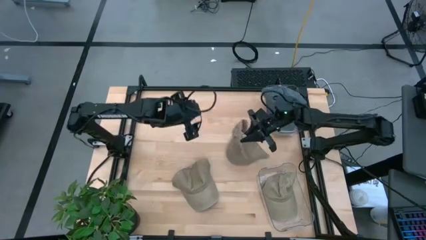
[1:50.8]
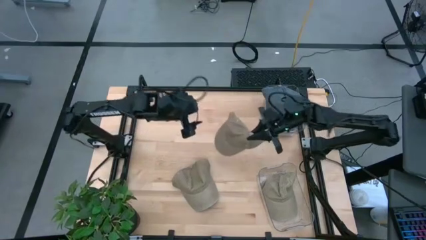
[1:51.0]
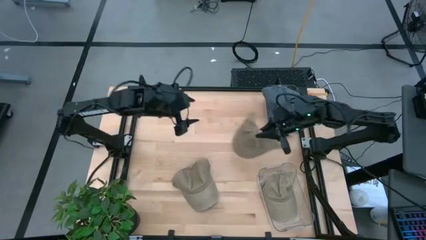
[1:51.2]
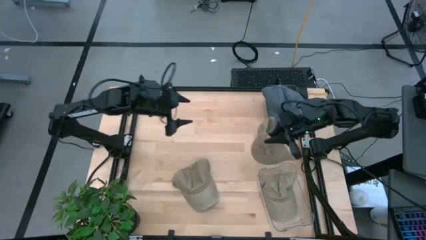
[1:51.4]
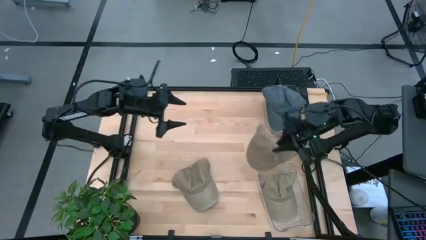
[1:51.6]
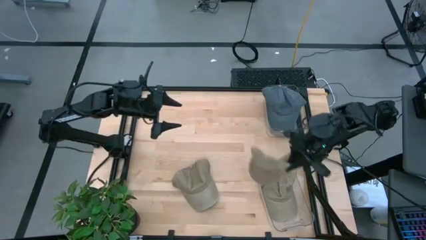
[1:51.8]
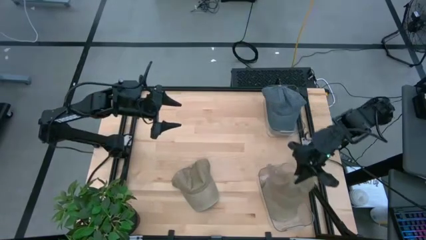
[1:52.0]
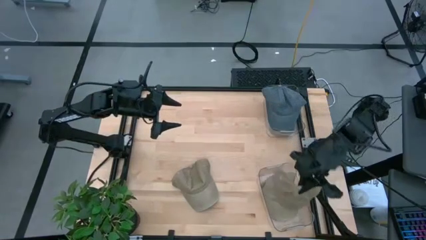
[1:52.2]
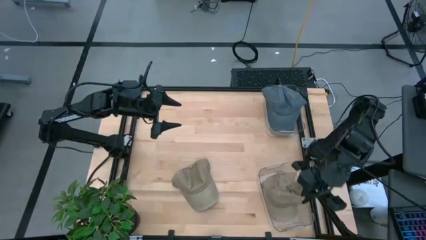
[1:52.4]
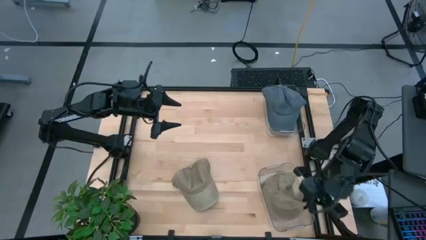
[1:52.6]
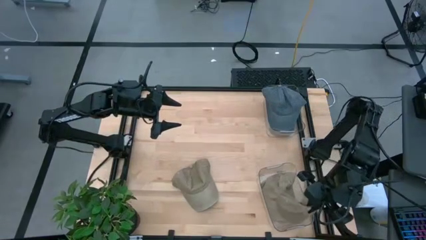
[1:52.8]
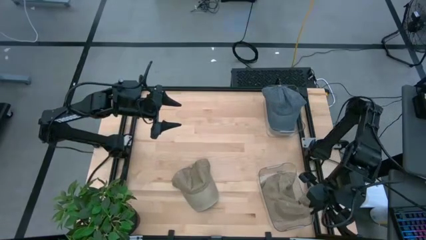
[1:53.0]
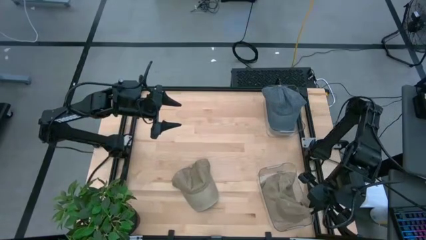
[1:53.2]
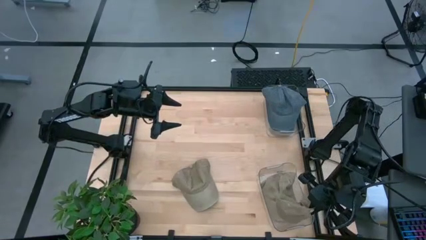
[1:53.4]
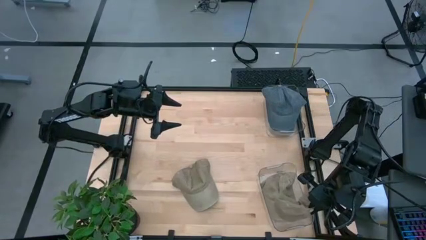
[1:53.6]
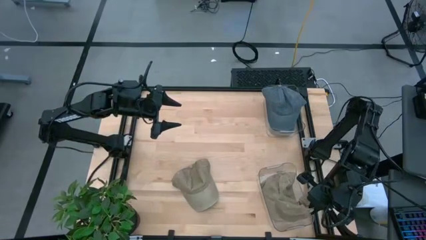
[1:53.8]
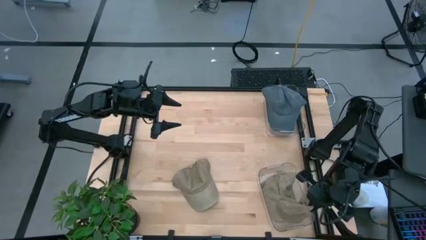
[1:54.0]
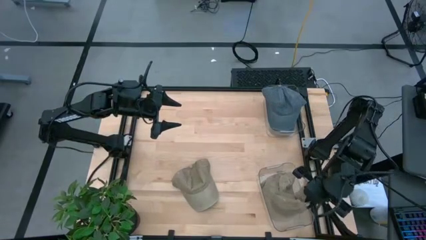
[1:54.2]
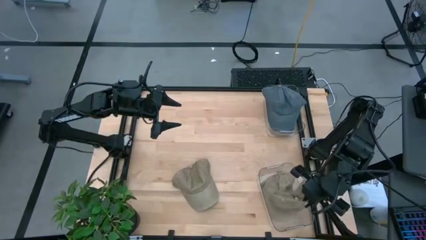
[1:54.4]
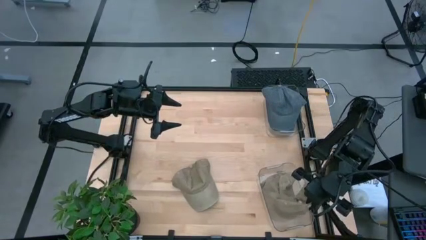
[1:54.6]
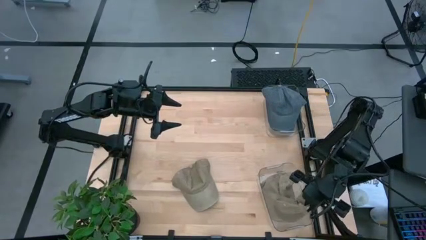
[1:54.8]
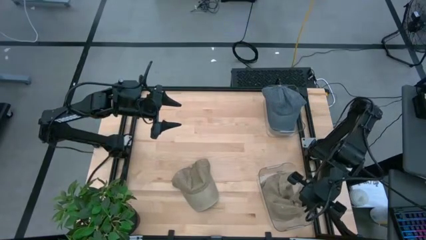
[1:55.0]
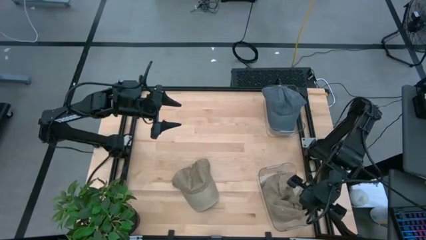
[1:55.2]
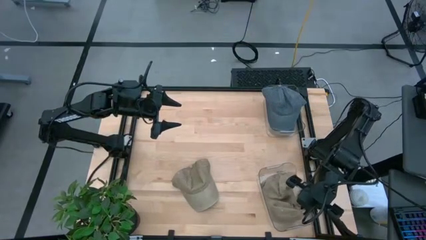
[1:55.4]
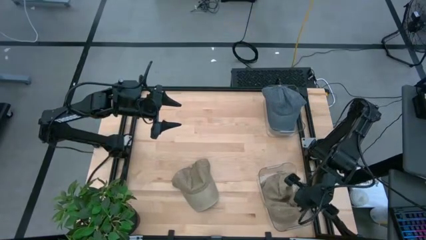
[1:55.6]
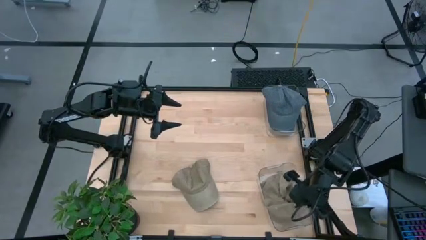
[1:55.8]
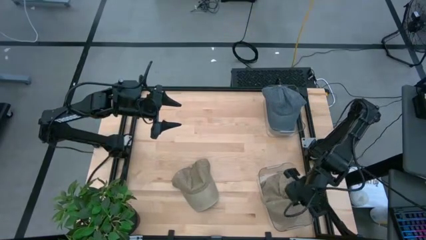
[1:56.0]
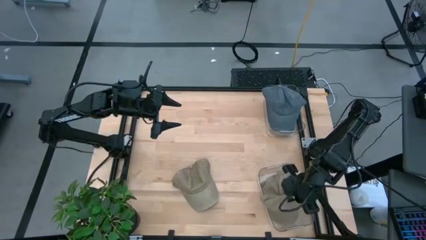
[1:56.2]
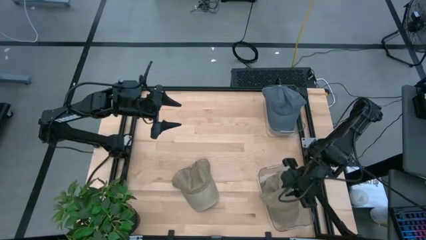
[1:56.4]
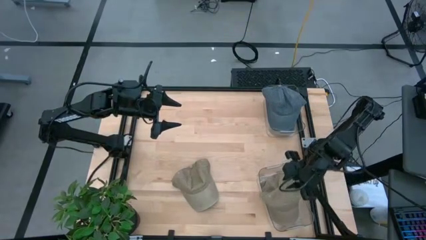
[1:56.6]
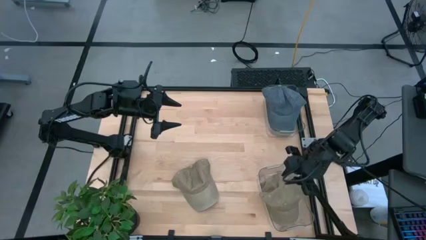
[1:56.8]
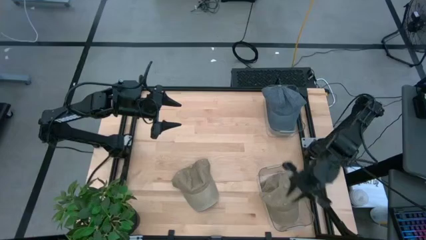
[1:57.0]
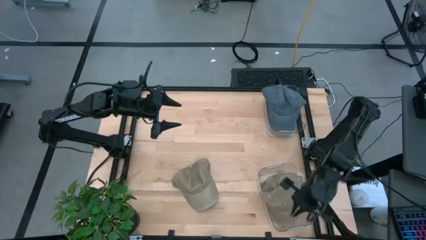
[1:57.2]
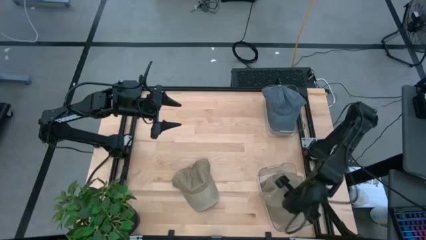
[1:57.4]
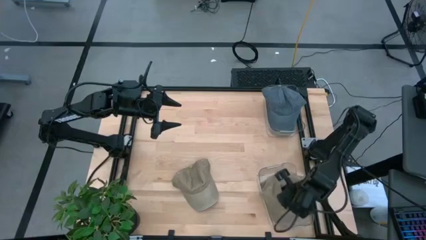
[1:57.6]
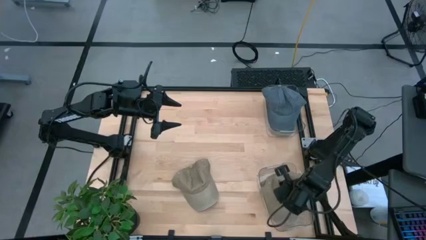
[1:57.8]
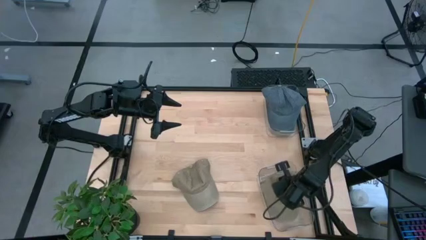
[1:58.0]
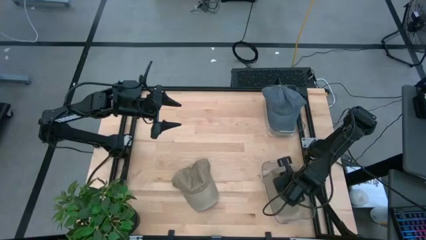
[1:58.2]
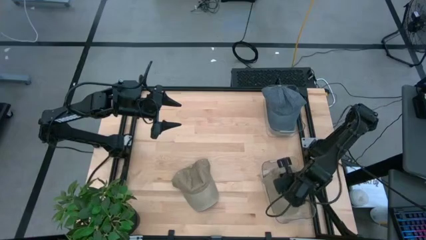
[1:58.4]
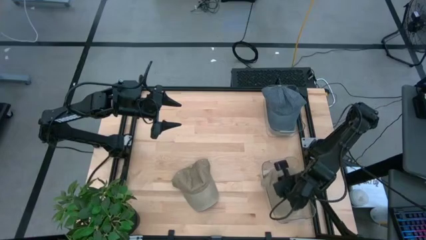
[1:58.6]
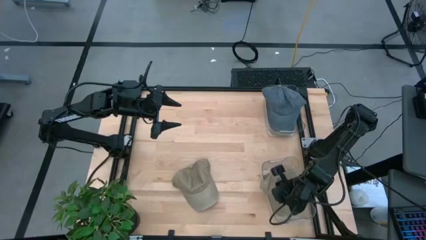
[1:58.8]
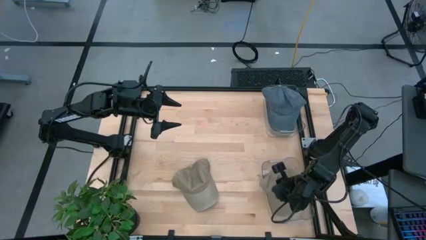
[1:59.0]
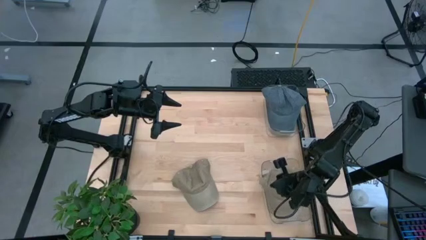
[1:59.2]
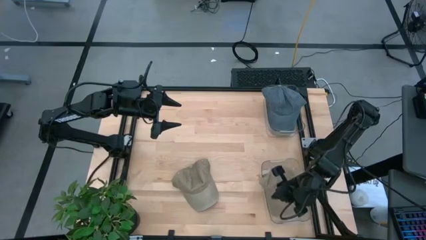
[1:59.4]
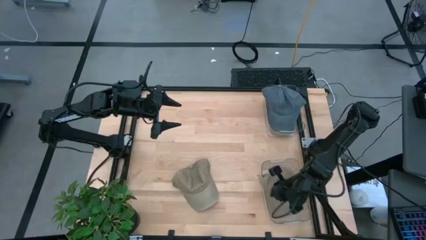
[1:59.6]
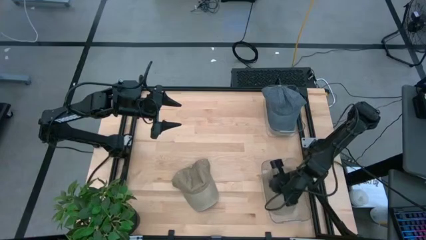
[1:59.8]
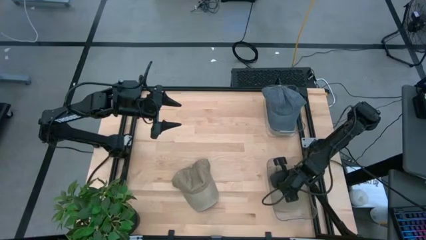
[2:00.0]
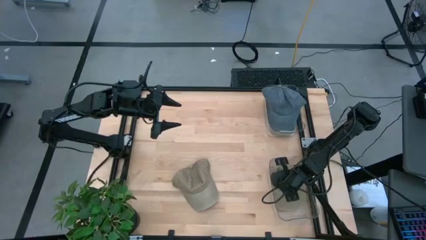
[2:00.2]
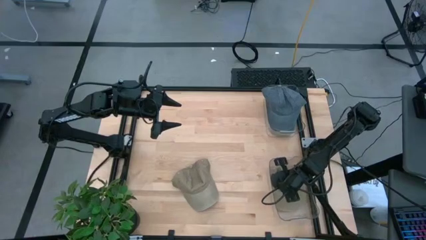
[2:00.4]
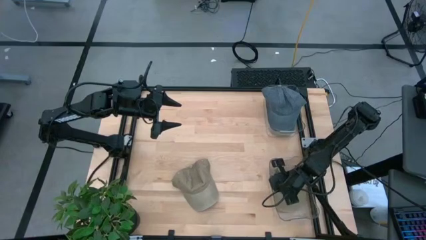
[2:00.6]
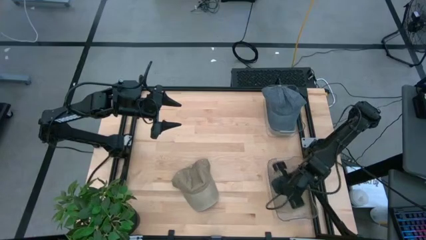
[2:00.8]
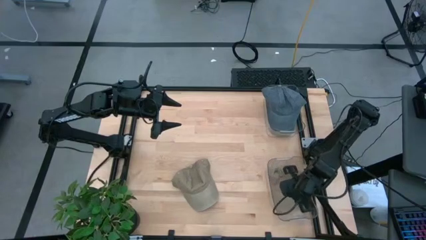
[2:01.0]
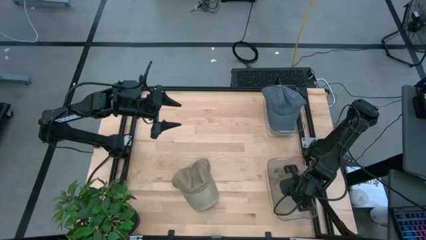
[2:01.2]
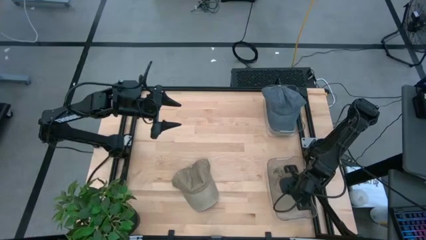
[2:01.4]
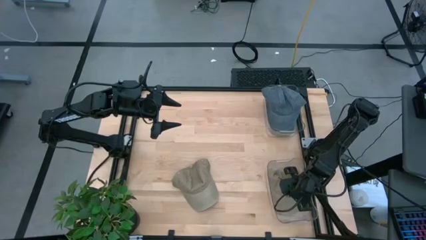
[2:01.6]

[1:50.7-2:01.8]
Task: Pick & Place hat
Put the left brown and blue cap into the bottom transparent bin

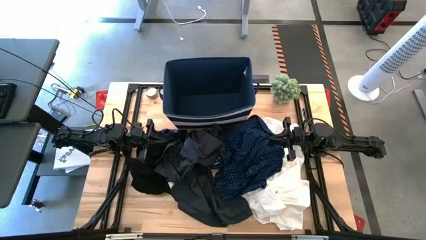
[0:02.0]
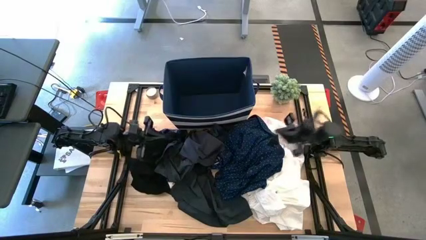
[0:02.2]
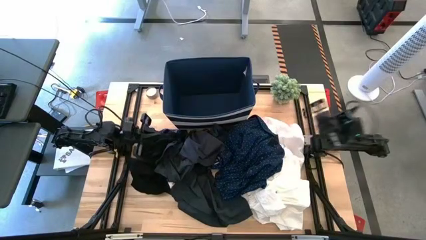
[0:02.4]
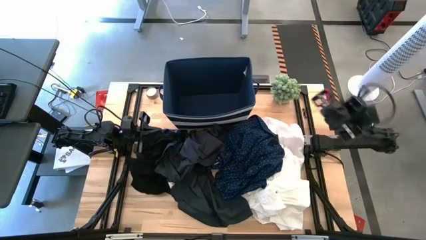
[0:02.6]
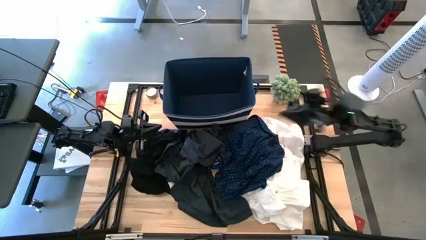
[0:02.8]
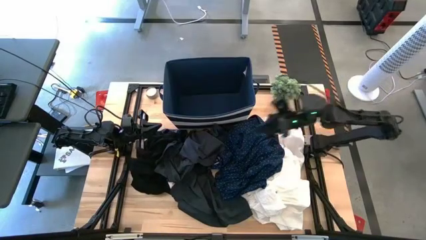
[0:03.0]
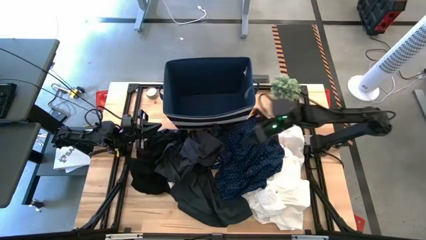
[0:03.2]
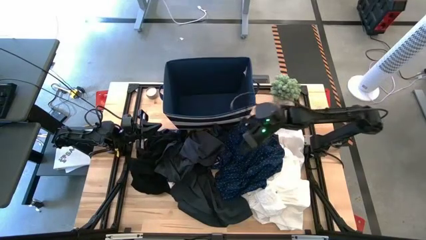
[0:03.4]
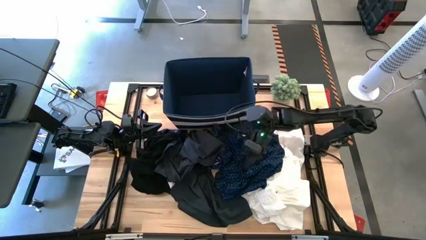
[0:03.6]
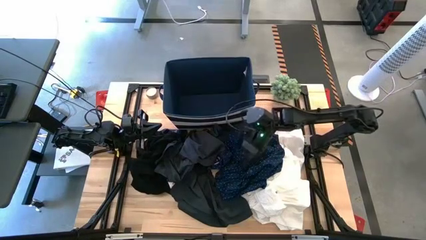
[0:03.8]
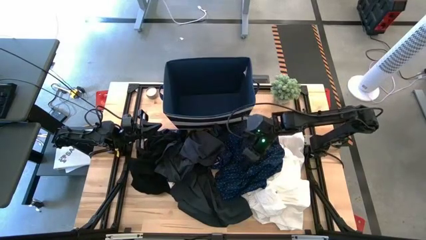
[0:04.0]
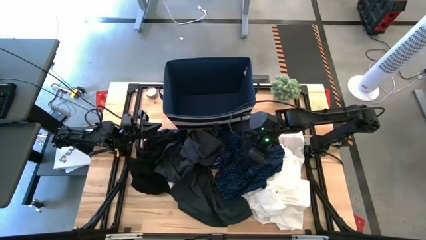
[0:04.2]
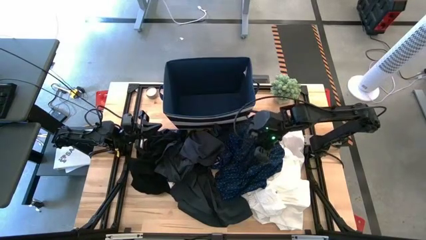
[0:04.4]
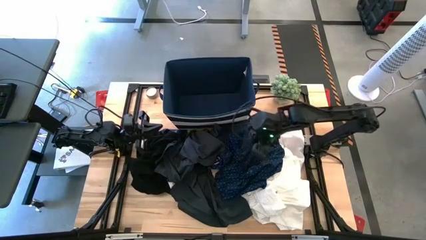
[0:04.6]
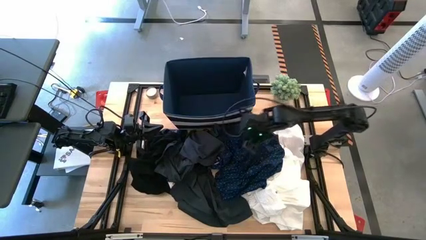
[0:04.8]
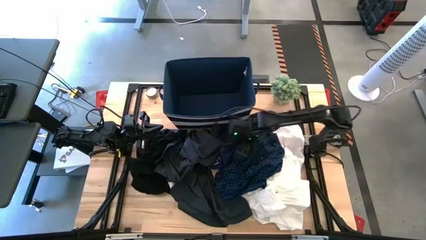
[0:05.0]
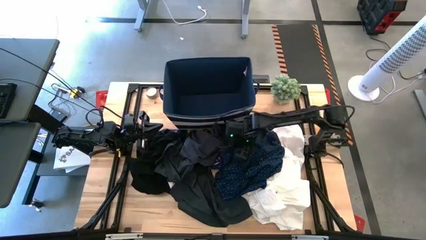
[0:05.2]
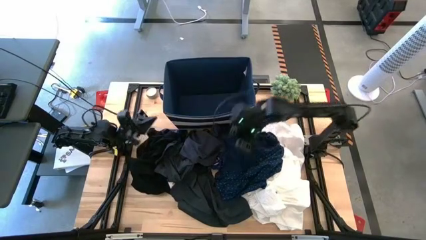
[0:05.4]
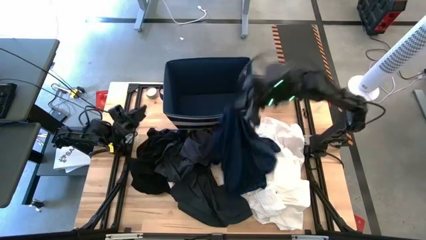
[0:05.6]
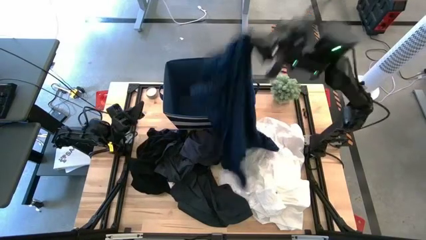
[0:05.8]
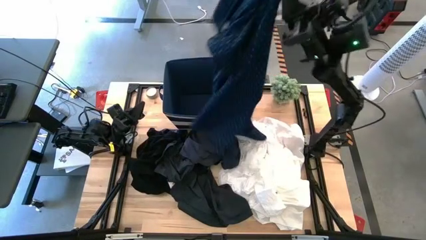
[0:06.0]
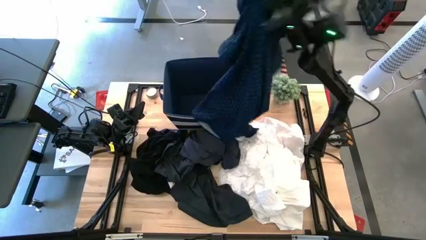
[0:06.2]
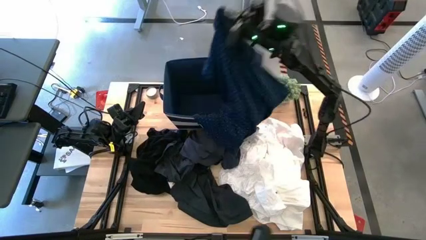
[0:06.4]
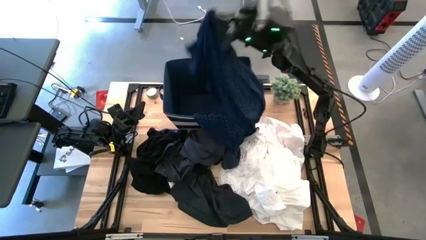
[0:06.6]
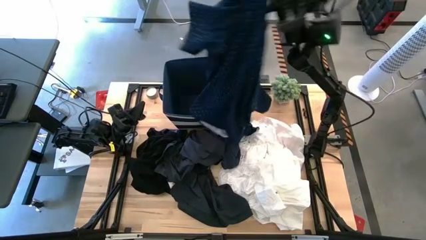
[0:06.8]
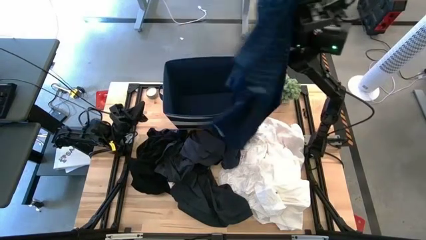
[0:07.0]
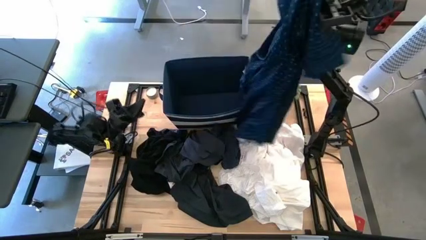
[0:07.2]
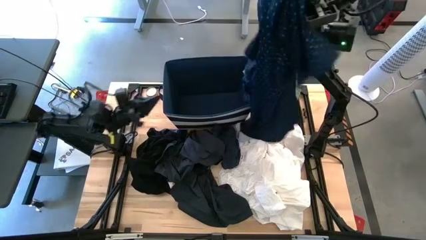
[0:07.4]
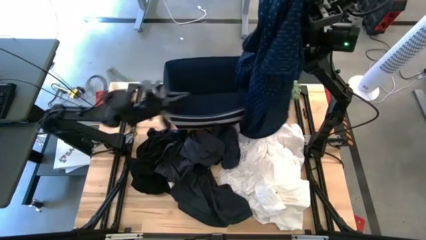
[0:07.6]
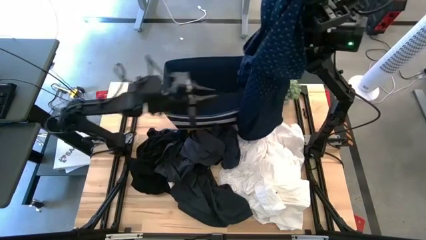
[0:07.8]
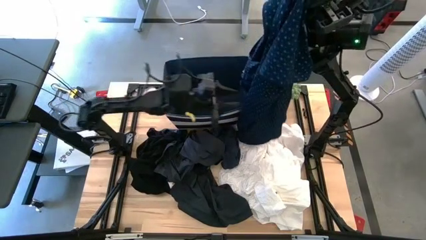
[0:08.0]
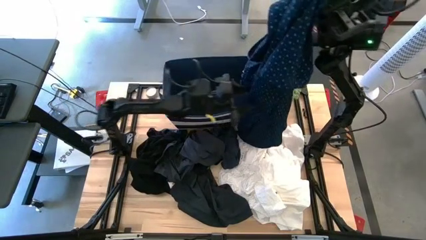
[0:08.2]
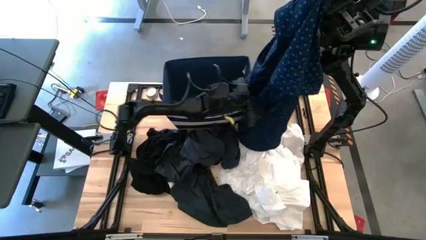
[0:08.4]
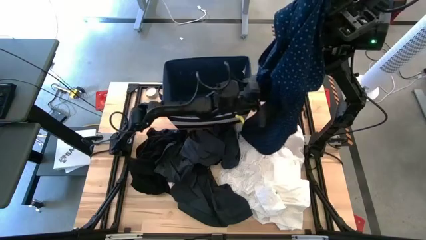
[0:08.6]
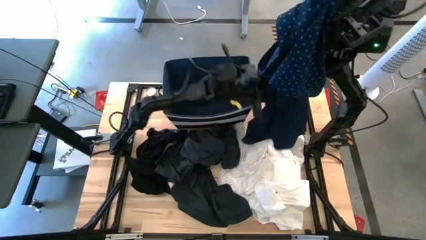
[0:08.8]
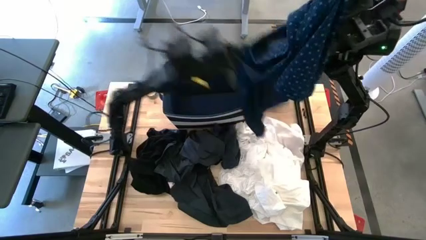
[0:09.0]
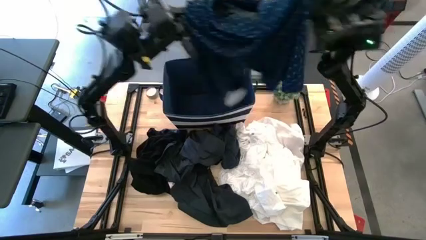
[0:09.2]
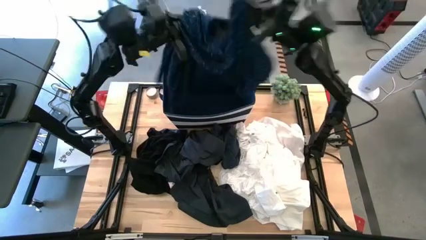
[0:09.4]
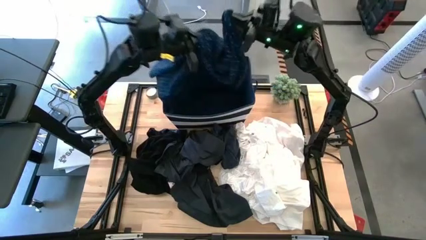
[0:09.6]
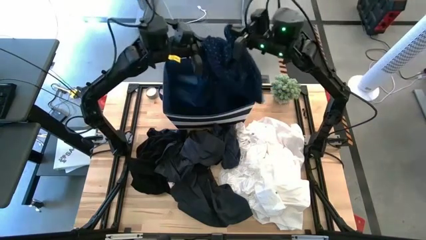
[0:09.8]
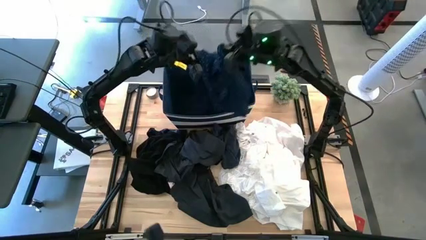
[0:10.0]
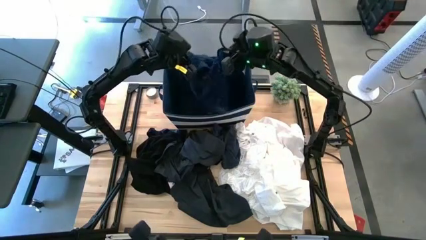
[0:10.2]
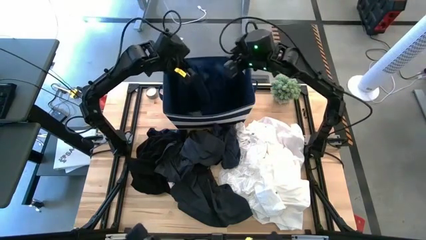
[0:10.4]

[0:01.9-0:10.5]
Task: Sort clothes
Put the blue shirt into the blue bin
